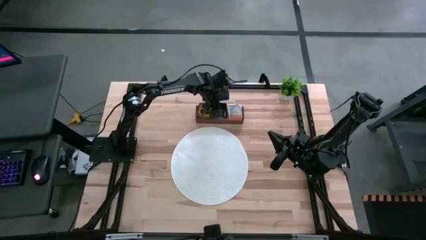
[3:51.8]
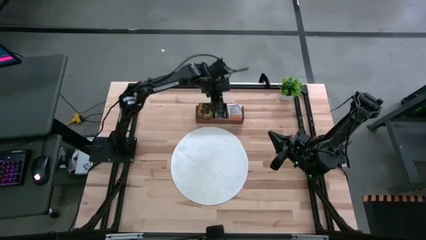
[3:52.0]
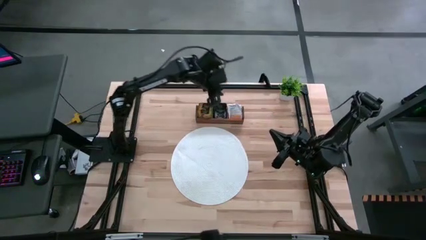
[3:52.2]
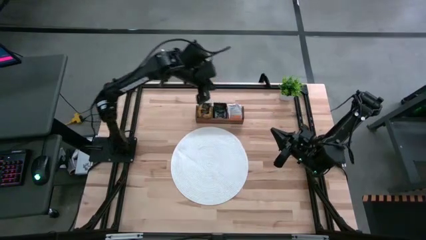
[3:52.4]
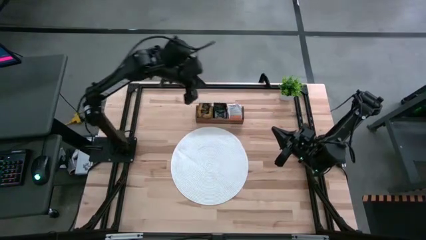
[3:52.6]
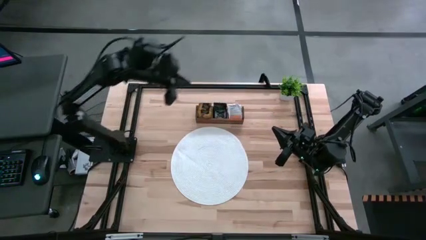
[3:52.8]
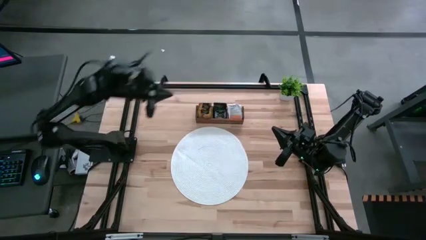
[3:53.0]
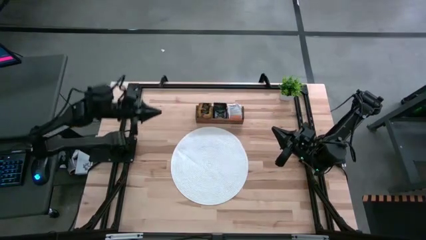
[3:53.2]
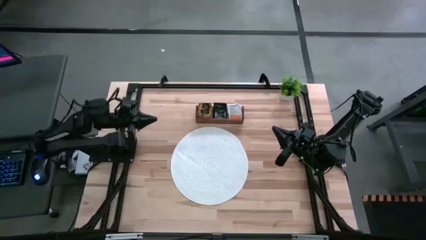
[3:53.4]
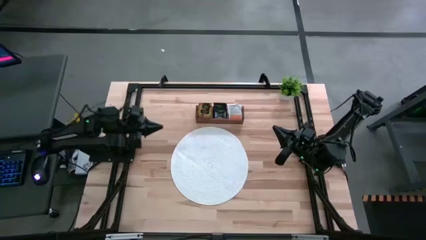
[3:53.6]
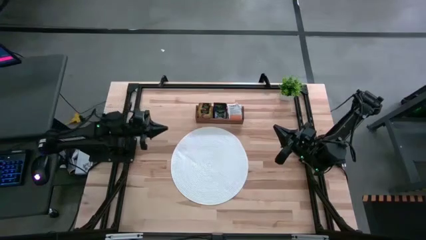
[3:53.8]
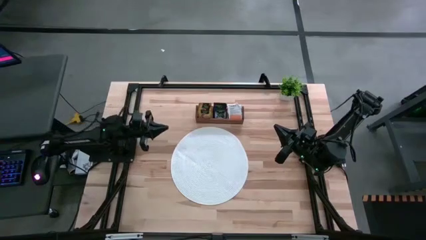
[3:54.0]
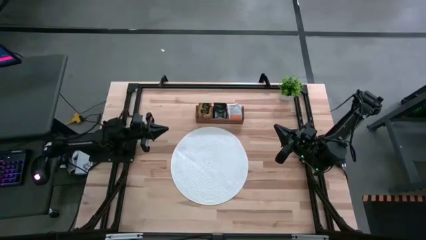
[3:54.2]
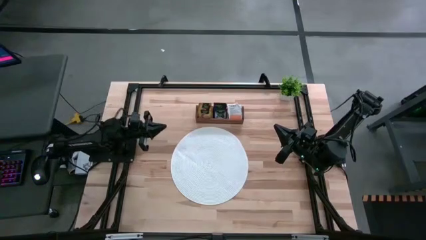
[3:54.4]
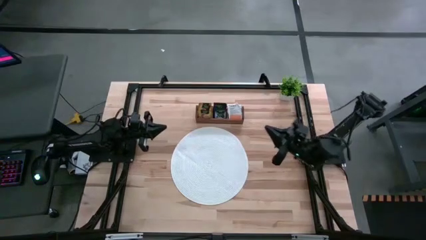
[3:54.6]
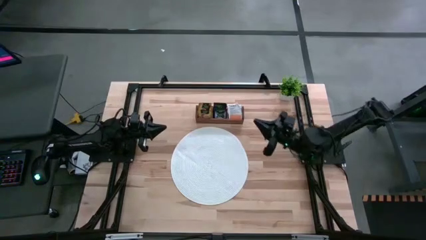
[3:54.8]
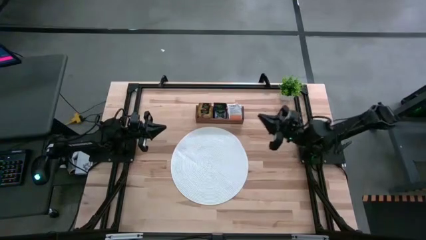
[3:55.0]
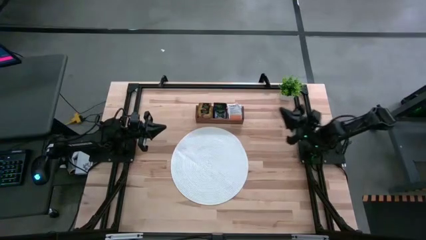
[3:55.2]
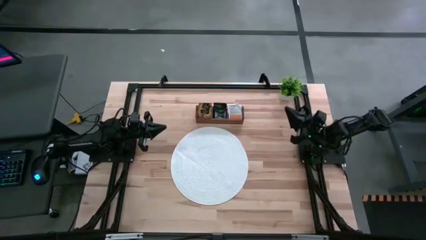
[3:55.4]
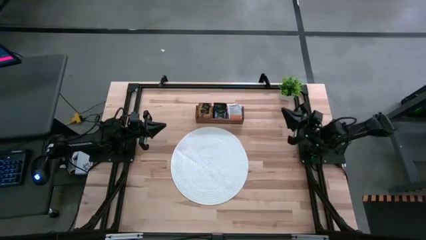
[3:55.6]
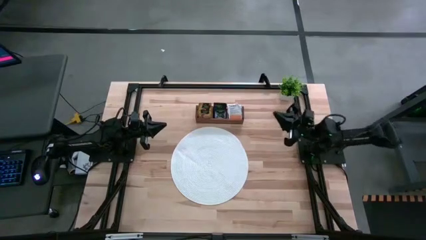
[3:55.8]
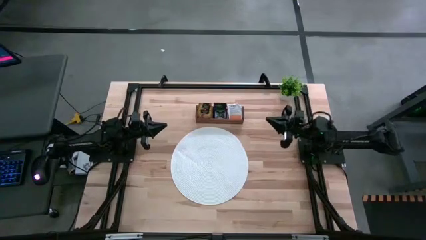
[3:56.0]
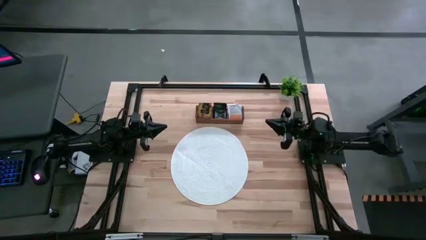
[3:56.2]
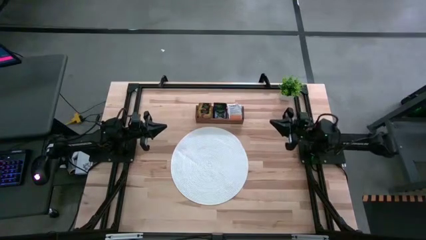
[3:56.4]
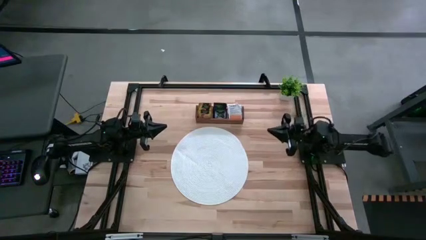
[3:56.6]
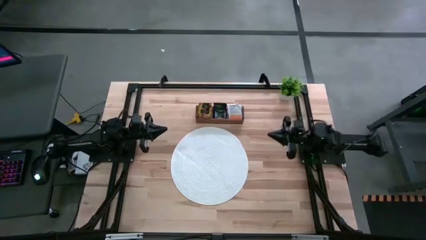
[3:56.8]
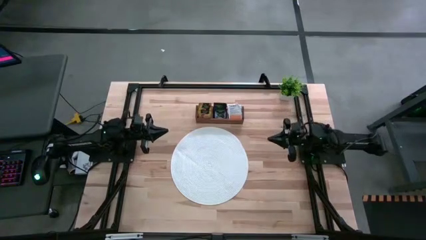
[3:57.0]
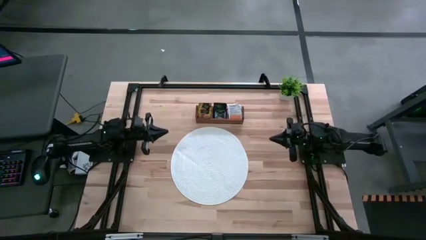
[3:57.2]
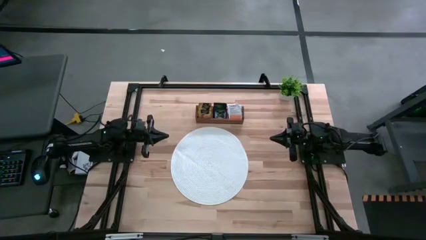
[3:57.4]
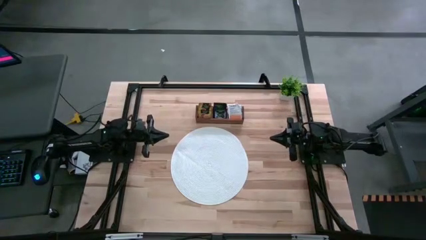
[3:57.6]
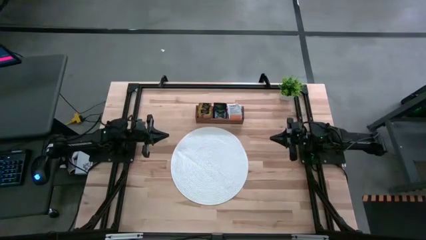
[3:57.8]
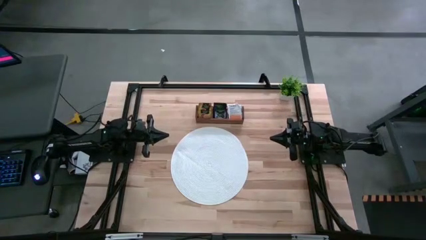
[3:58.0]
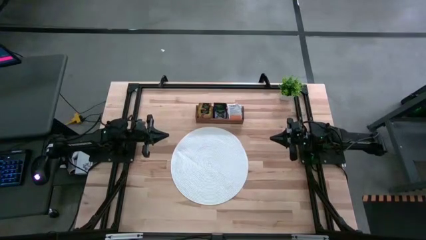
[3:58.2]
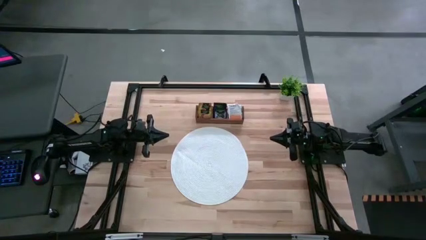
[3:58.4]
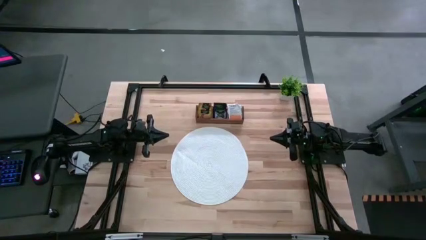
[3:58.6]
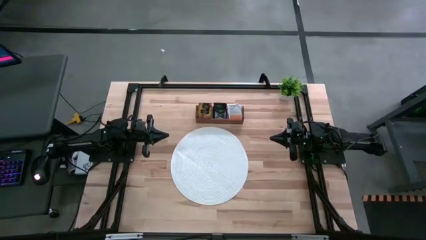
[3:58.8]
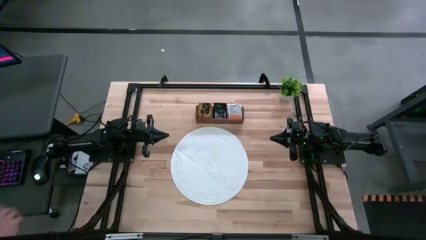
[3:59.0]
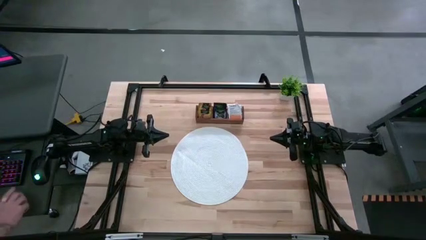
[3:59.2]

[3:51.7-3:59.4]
Task: Pick & Place Tea
Return to Home Position

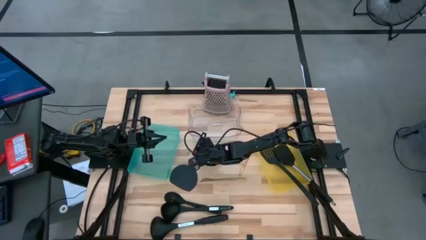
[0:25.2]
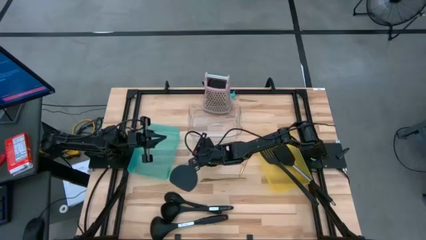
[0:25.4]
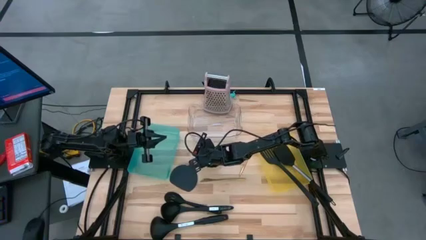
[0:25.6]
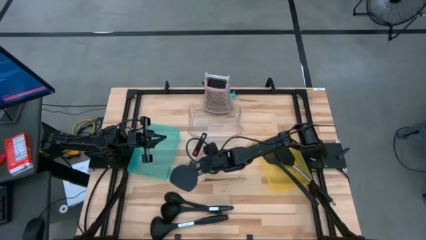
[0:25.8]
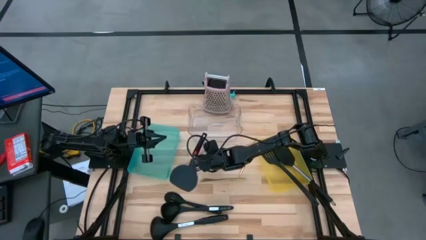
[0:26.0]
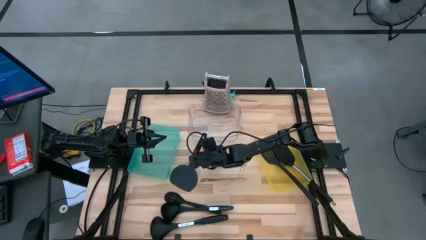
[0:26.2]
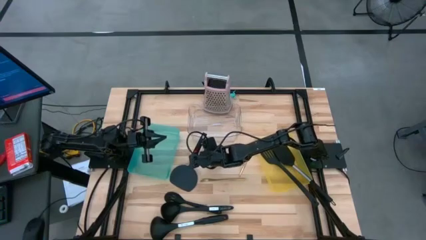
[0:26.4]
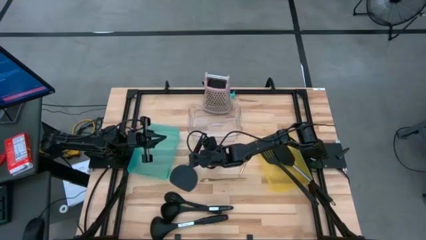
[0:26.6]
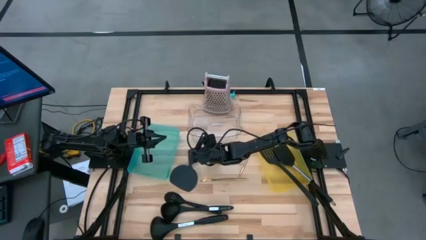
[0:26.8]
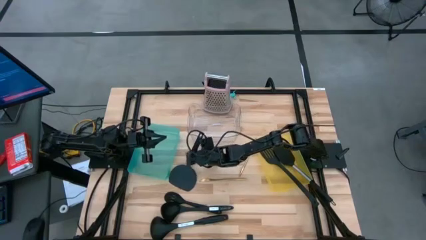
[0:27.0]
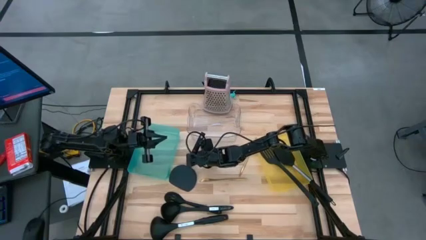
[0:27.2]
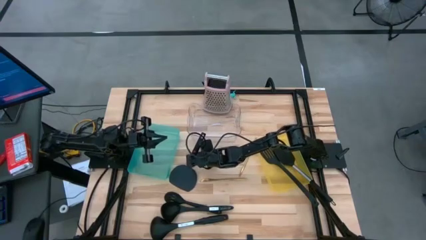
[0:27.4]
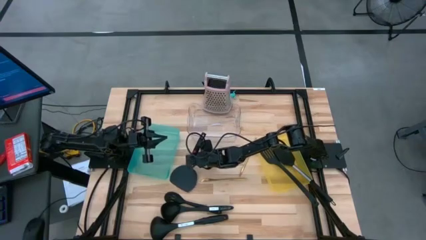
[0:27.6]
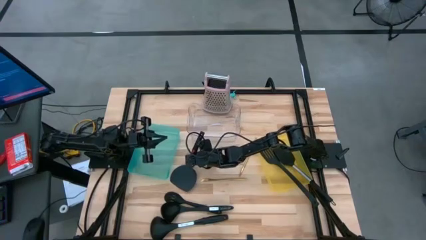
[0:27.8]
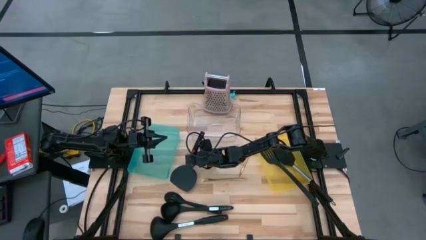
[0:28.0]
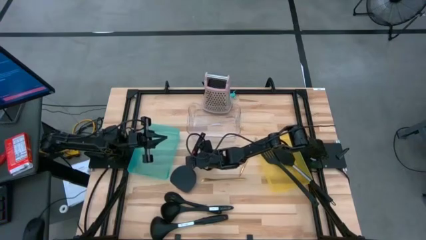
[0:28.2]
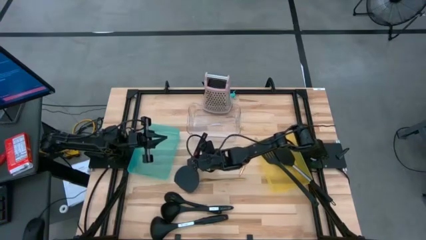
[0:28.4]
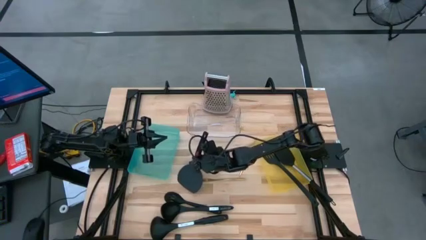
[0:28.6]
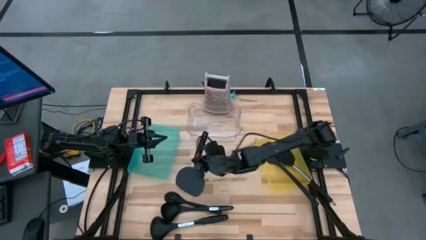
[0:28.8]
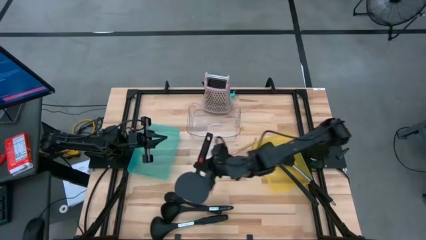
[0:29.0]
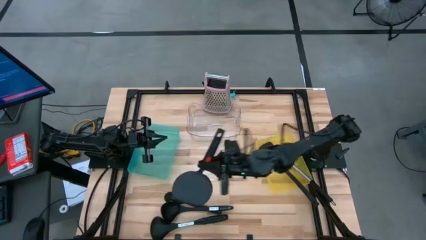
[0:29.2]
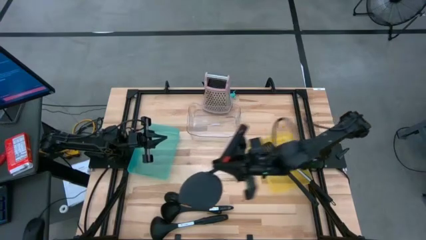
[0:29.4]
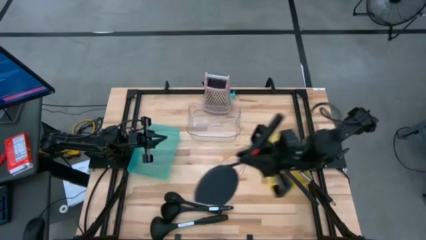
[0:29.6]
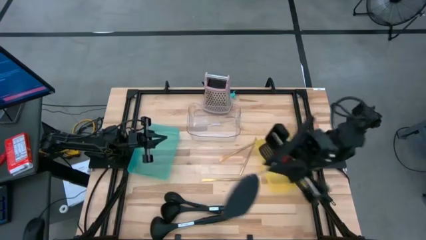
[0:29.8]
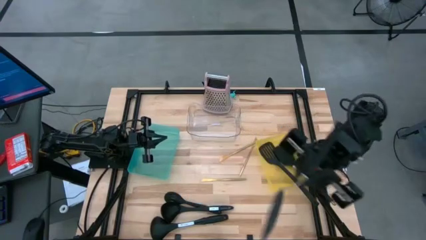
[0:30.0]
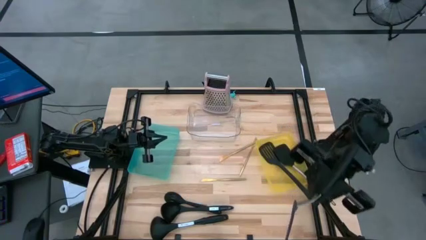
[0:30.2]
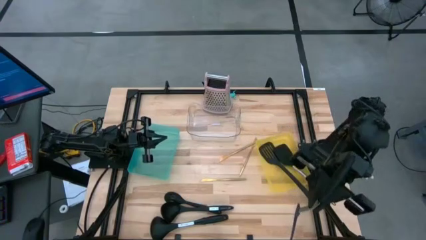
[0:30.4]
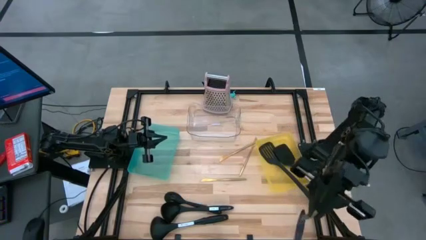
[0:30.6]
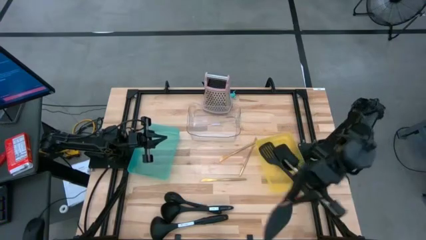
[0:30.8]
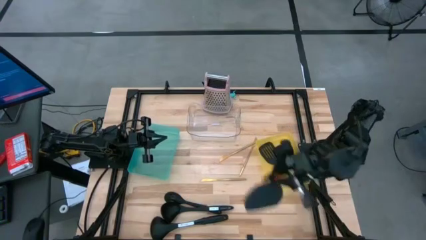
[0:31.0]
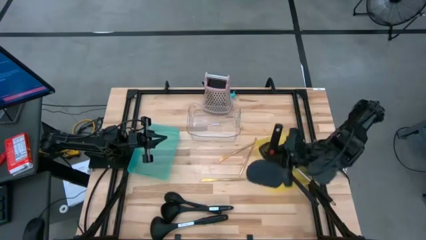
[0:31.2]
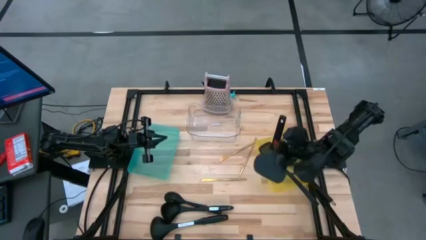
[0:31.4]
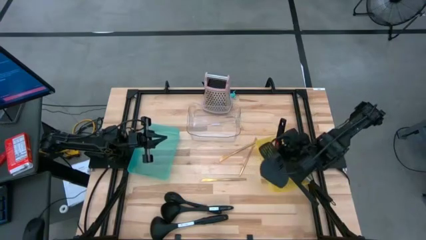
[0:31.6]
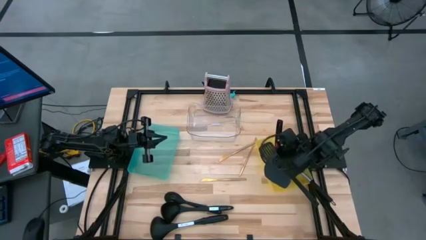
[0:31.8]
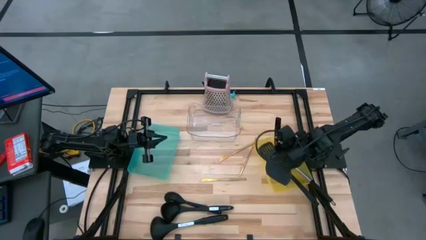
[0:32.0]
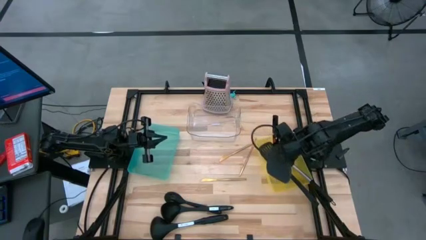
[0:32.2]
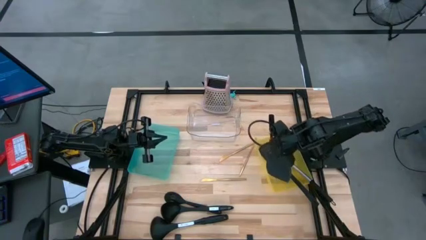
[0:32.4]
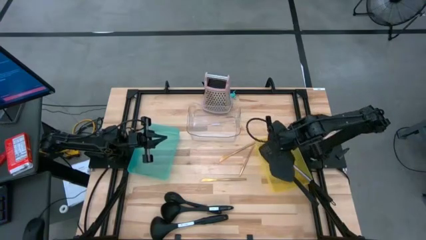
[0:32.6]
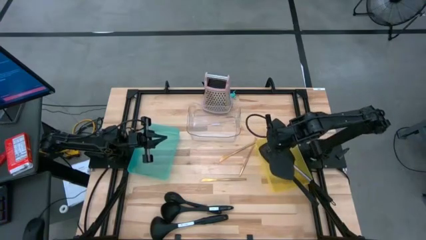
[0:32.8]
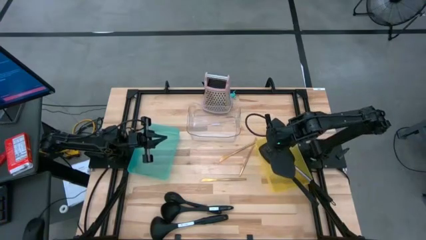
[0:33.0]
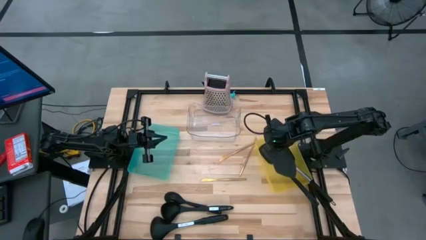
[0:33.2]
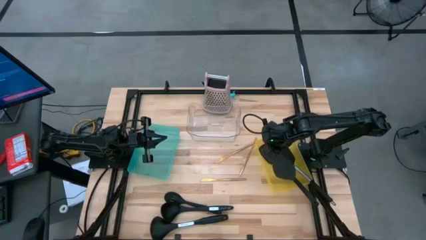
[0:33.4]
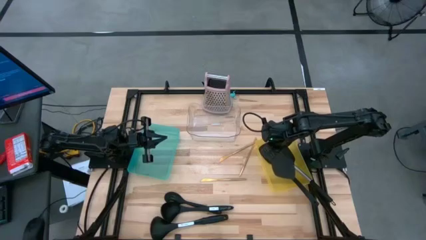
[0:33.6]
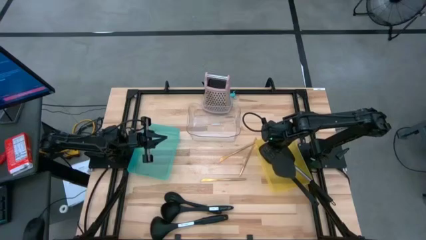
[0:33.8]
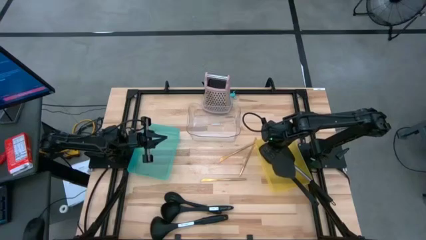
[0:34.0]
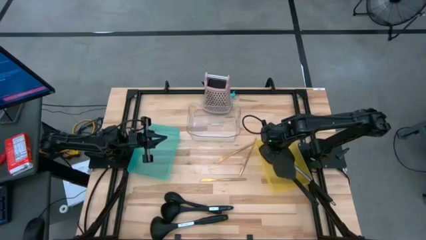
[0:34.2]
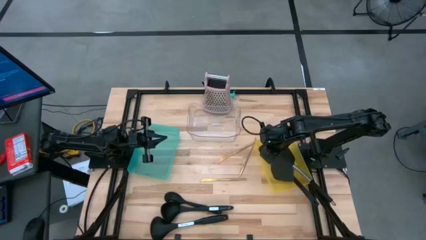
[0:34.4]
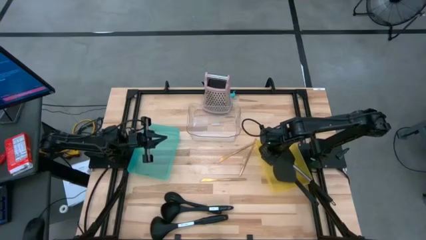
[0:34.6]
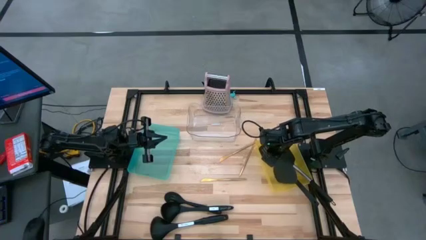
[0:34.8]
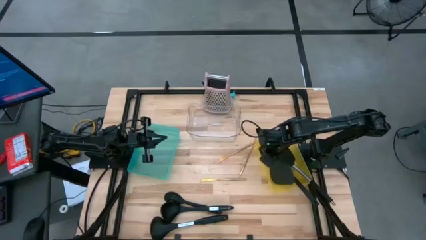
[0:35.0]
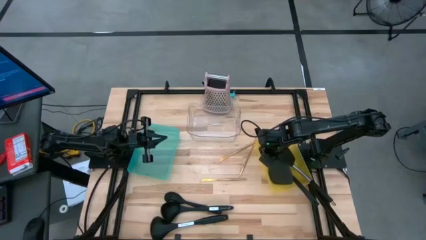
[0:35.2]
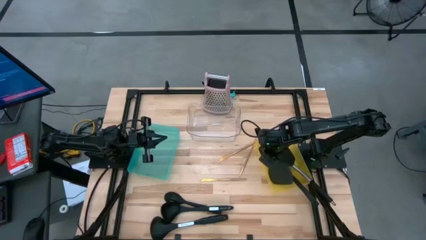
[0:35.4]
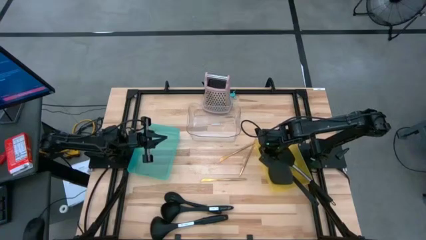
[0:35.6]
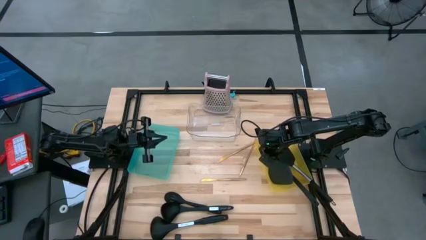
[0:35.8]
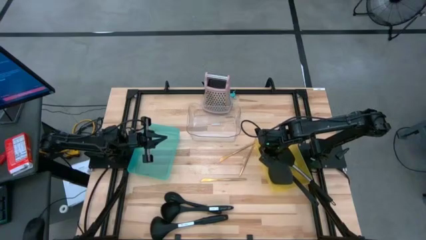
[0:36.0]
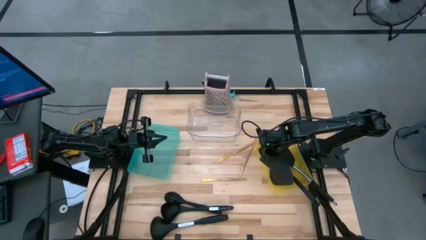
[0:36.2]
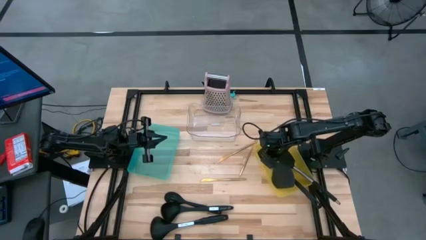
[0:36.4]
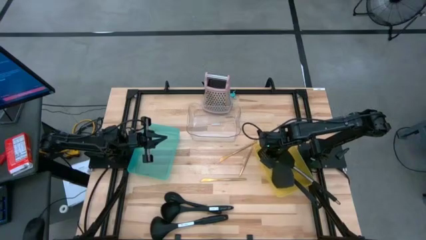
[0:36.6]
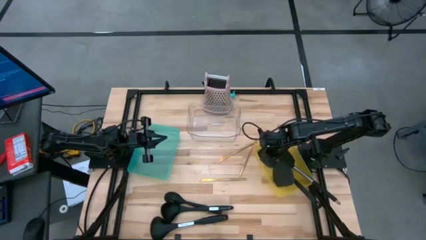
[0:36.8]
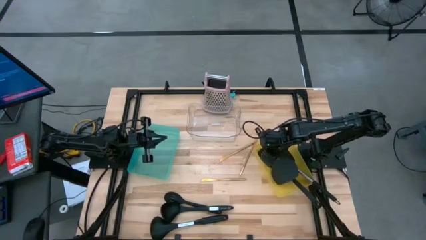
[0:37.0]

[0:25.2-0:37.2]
Task: Pick & Place Kitchen Items
Put the black spatula into the yellow bin
